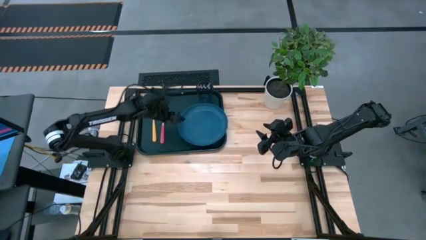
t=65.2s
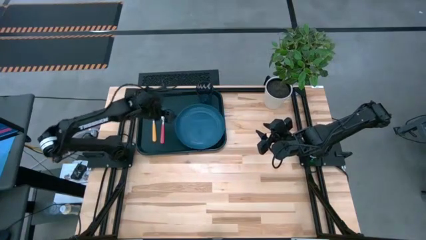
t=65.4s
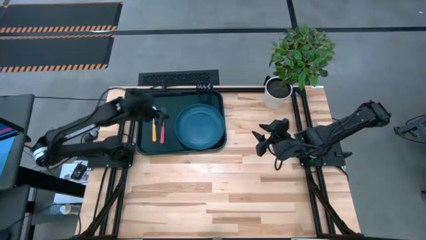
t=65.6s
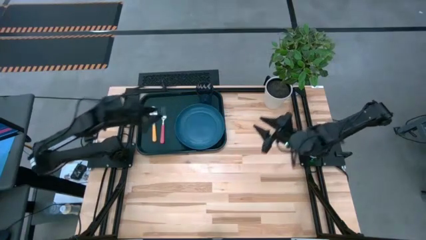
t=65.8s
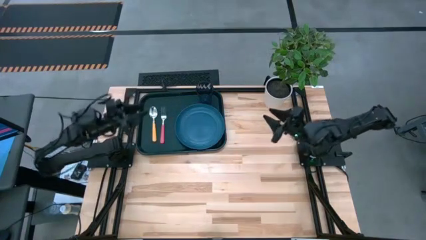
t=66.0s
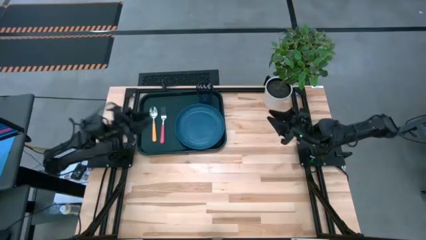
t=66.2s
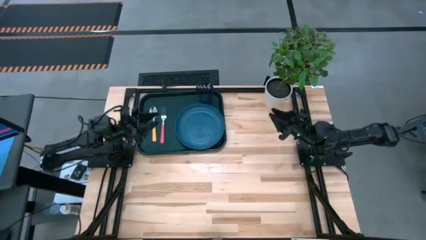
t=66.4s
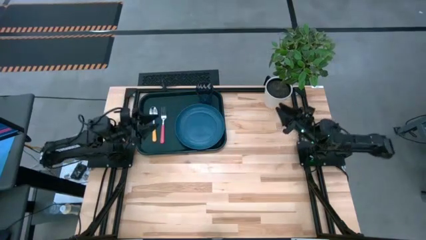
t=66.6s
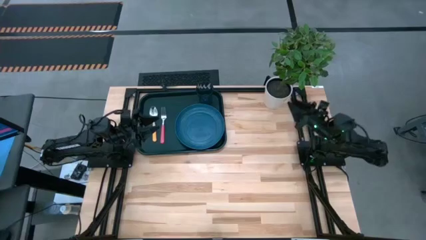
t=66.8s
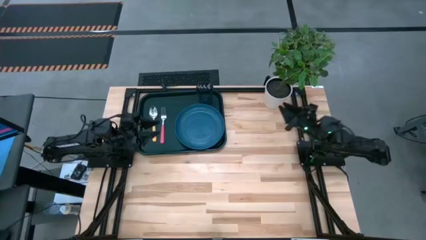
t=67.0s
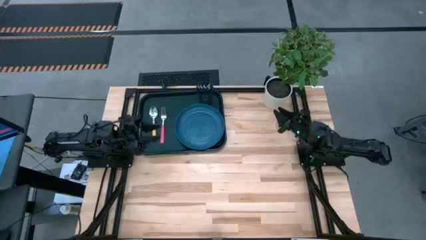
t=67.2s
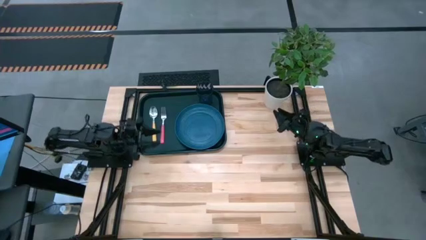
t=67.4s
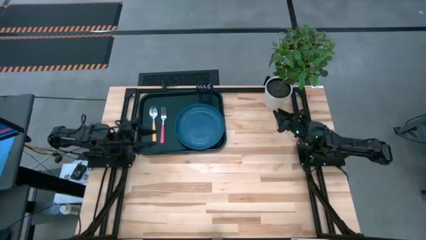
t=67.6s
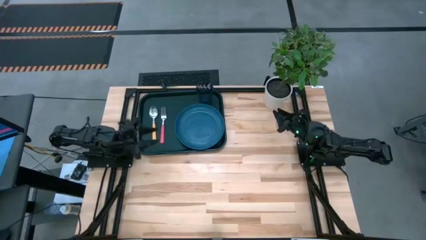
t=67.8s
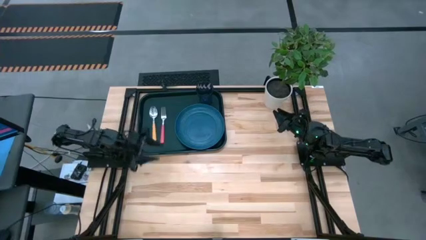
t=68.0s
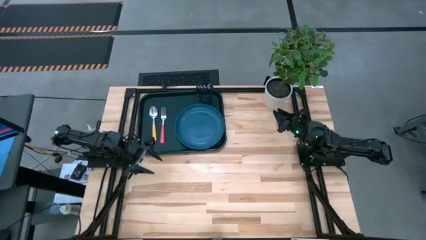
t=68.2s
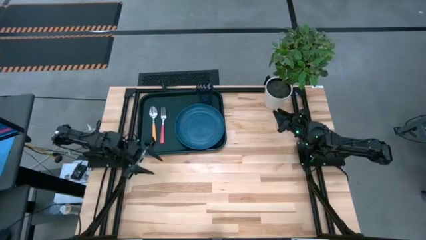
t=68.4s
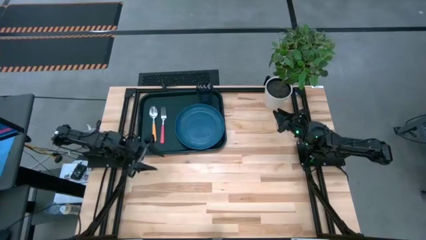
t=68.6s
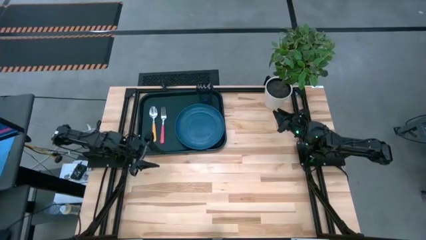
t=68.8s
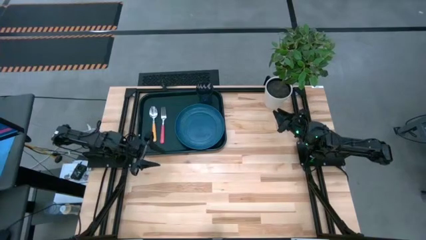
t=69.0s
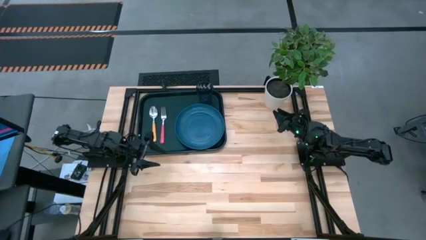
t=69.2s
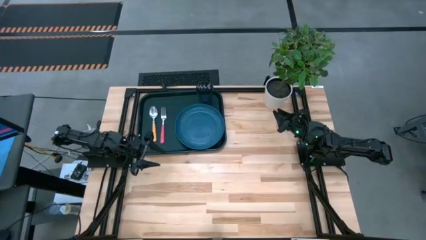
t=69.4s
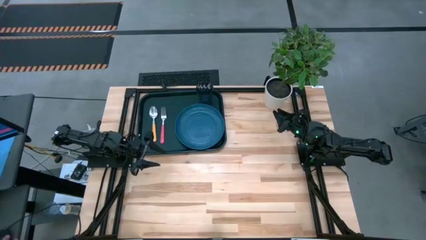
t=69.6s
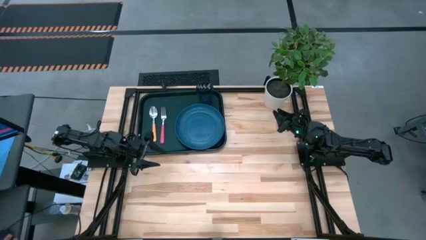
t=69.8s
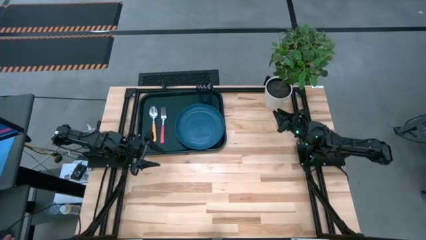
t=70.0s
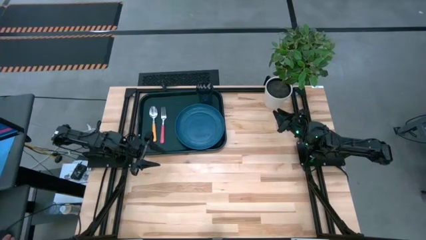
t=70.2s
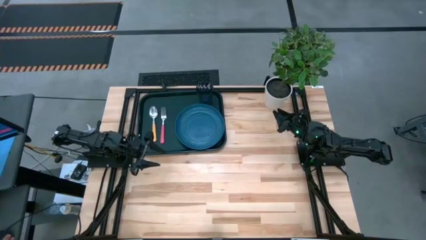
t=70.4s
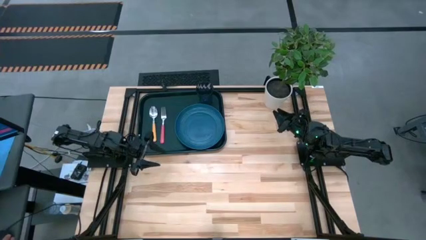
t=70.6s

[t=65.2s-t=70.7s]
Task: Pick and place plate/cup/fork/spoon on tray
Return to Home Position

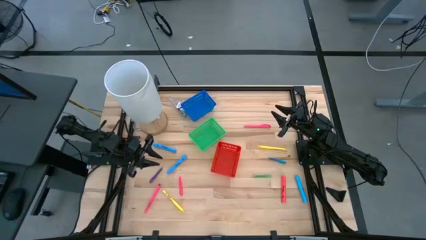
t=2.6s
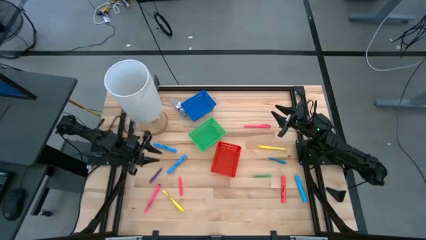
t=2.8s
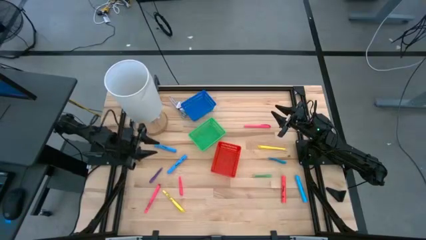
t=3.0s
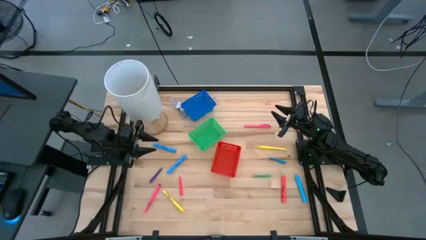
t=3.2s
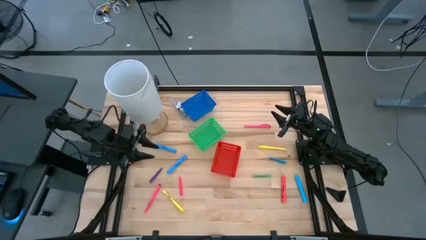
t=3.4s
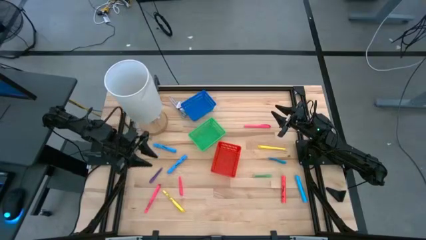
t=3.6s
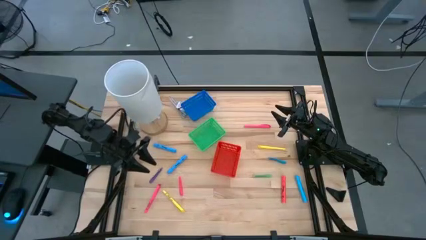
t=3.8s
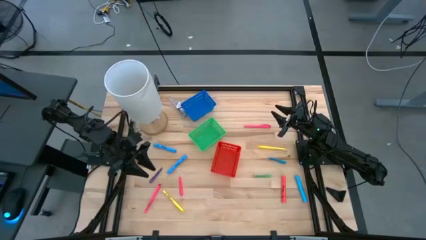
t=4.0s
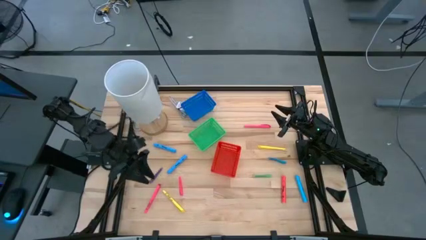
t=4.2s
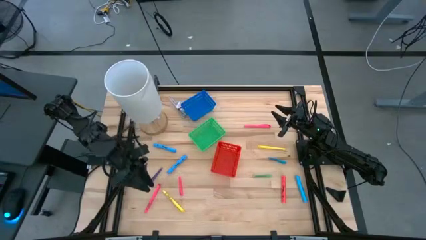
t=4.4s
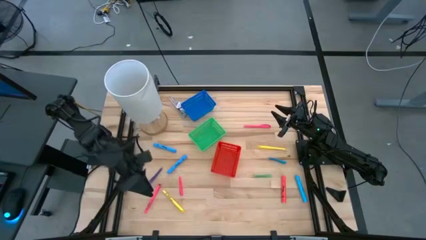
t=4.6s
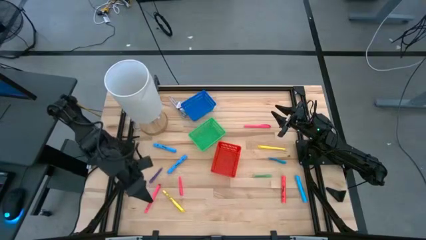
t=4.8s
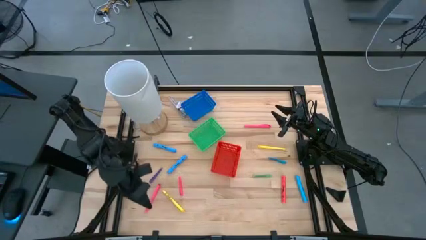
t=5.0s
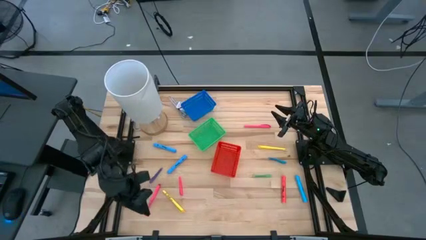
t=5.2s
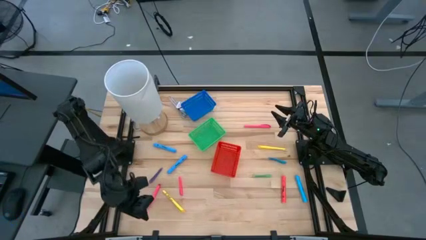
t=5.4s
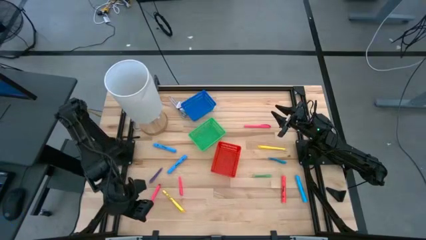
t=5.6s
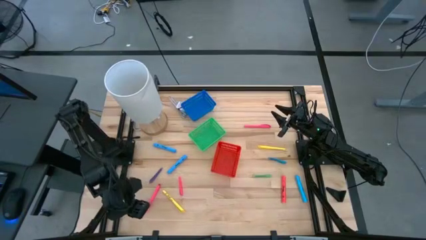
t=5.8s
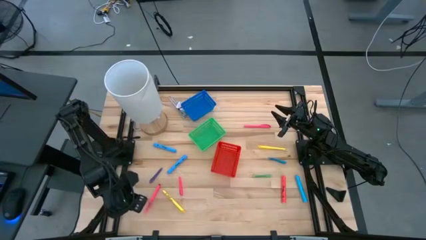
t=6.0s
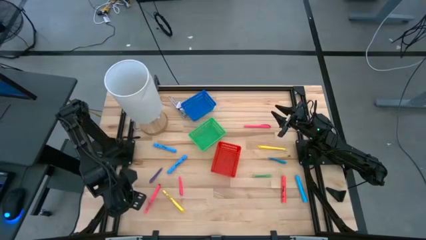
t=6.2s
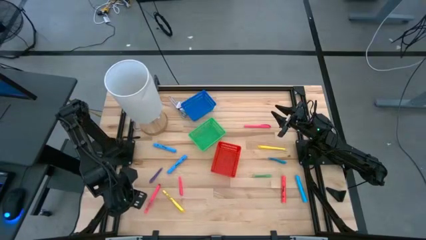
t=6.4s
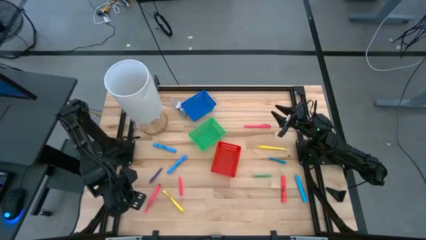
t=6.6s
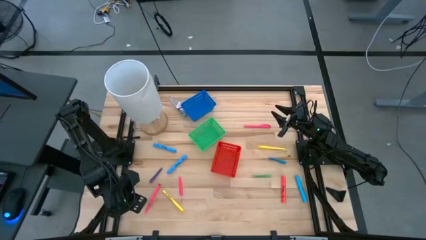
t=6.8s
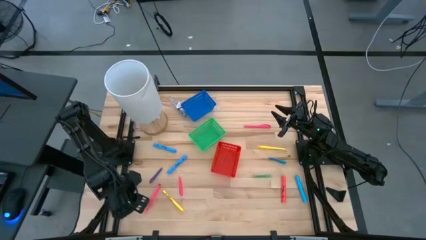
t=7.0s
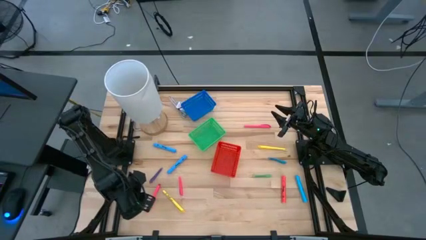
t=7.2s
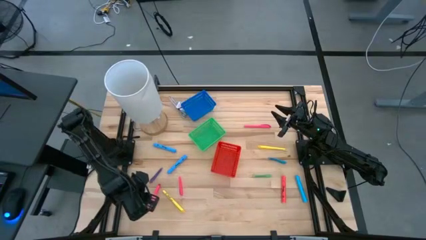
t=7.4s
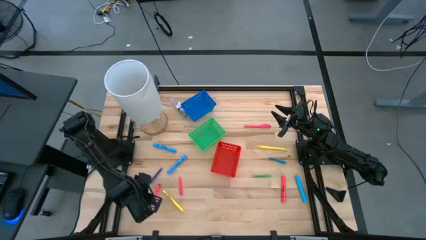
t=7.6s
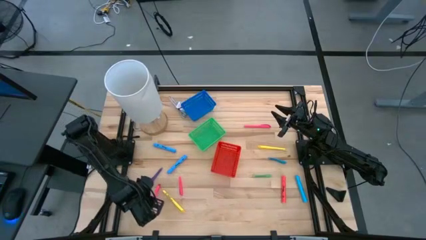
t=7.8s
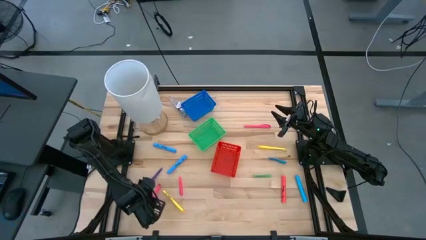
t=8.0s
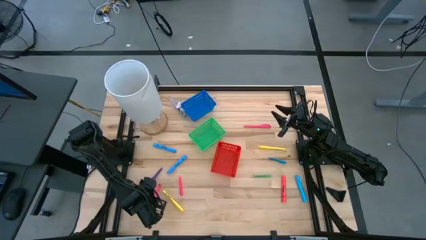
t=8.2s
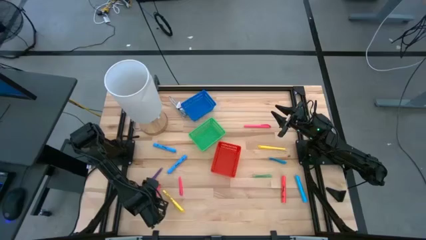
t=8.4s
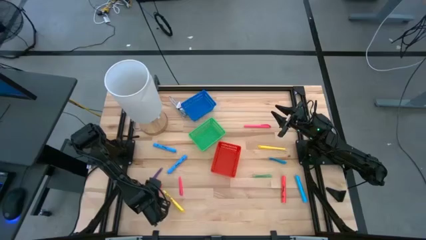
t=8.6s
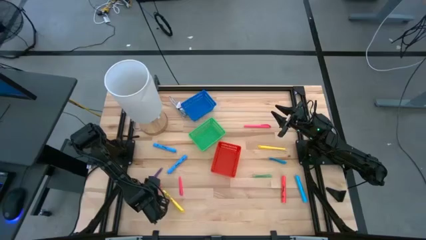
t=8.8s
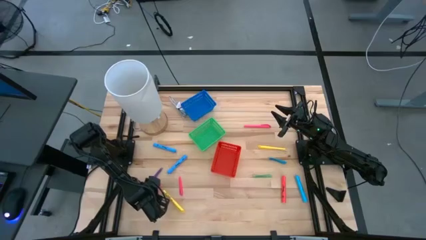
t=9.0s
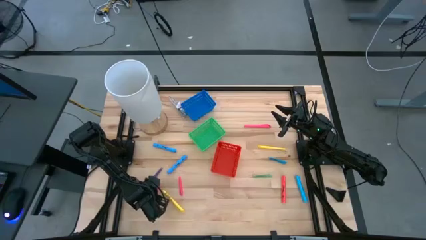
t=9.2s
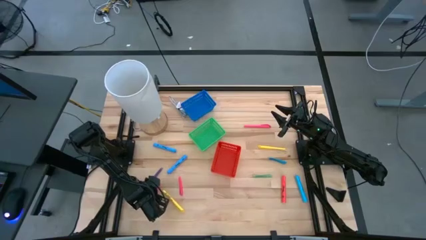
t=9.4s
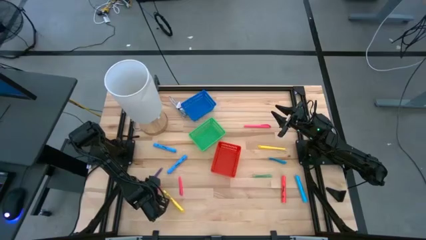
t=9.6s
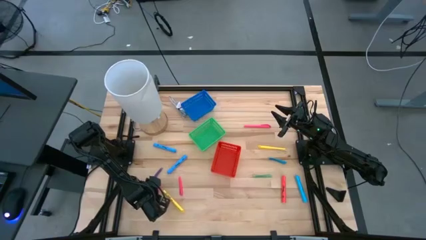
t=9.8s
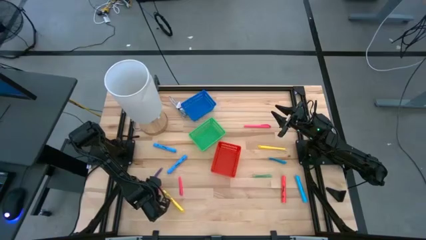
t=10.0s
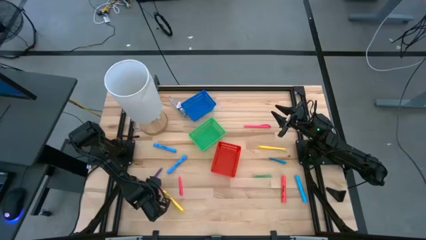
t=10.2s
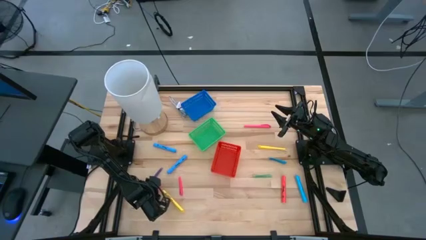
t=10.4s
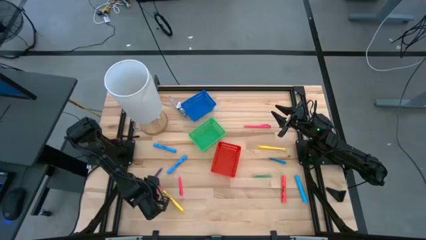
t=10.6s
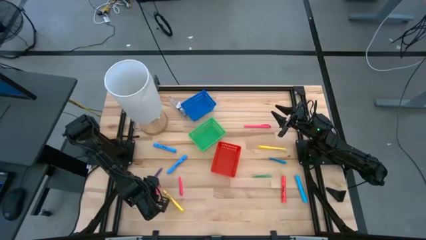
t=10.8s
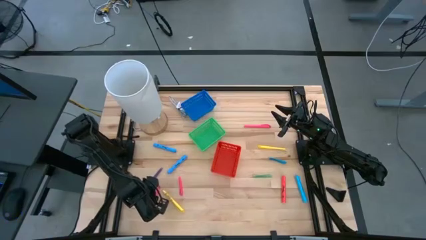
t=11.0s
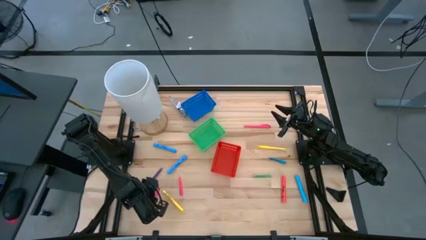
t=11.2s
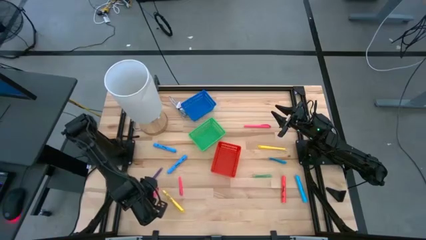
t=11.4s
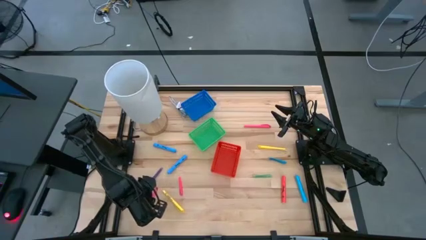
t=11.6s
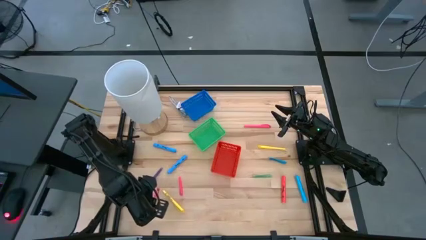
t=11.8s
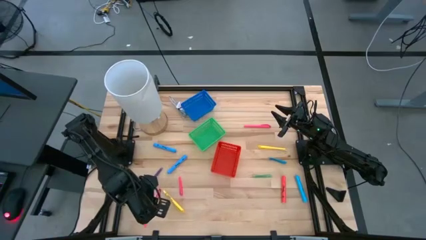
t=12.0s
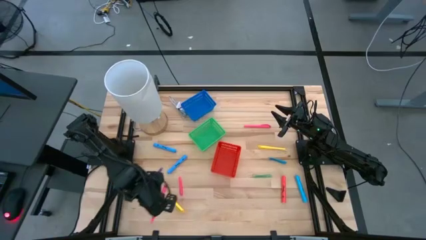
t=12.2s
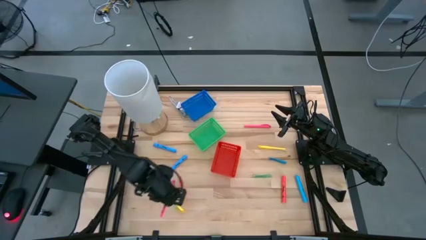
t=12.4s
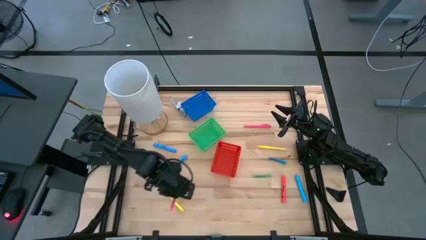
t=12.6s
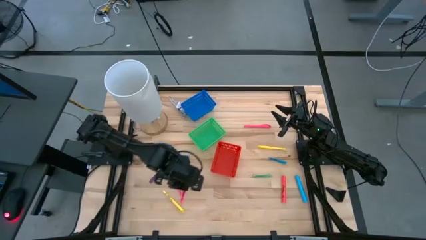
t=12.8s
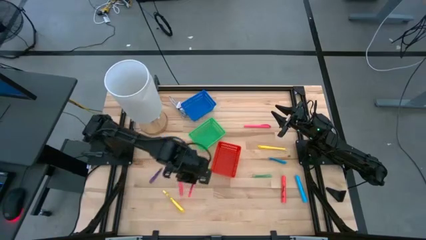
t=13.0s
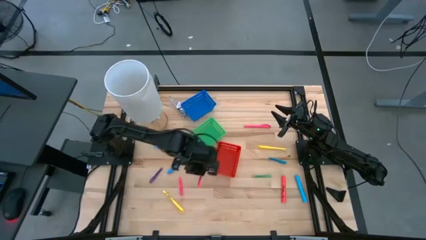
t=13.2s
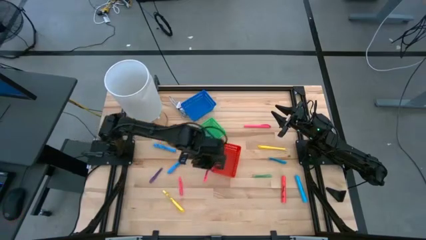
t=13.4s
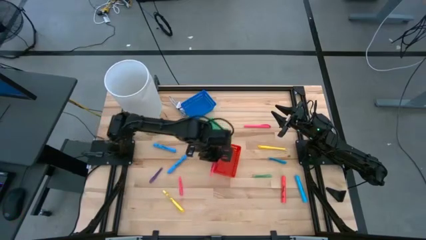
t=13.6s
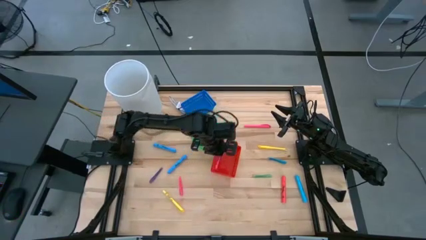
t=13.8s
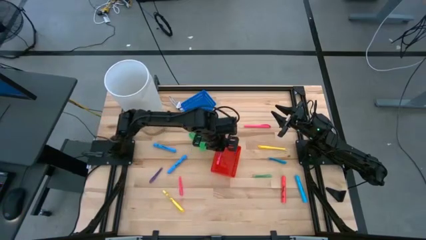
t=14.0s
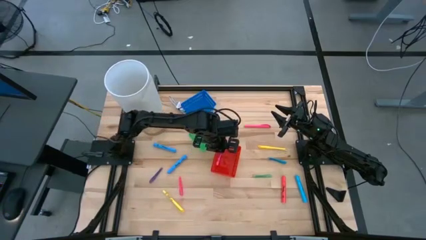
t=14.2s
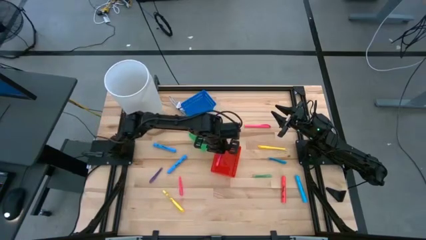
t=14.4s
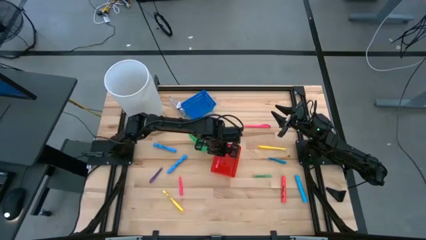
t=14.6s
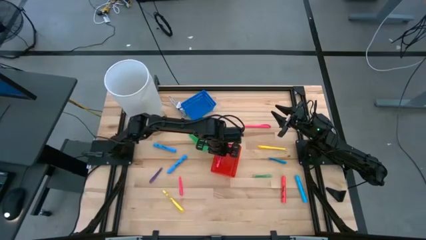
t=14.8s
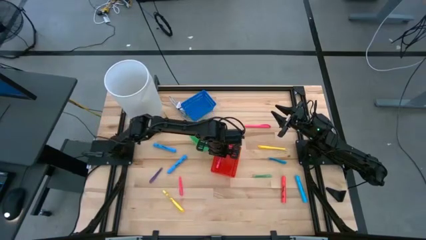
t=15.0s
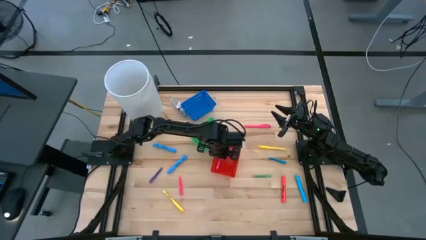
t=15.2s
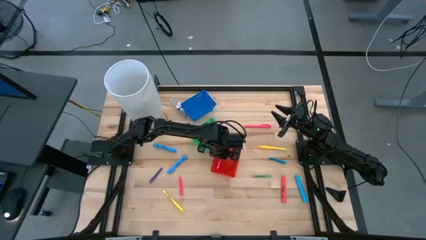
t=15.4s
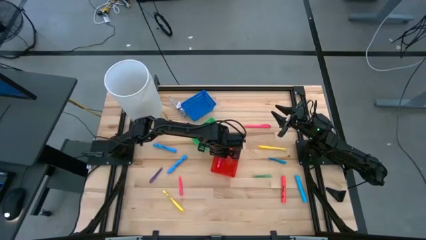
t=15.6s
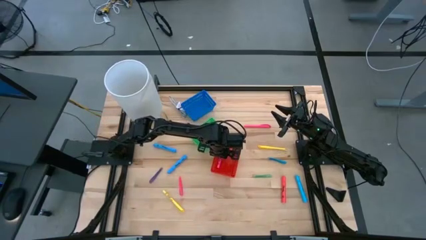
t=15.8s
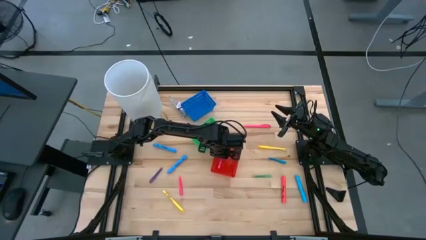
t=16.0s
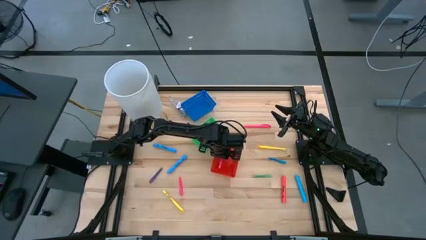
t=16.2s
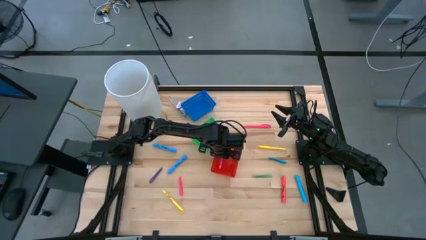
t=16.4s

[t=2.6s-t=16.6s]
Task: Pick & Place Markers
Put the bottom pink pen into the red bin
